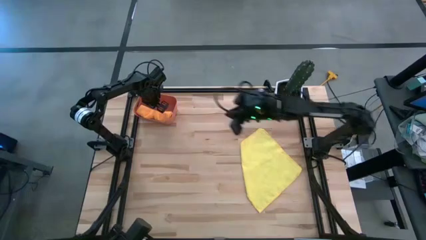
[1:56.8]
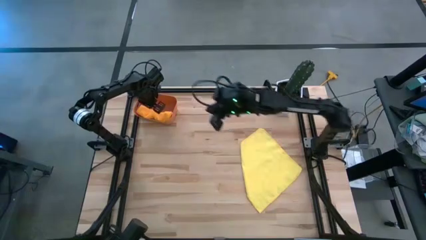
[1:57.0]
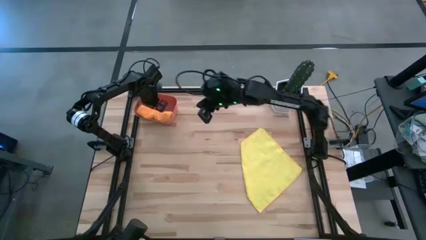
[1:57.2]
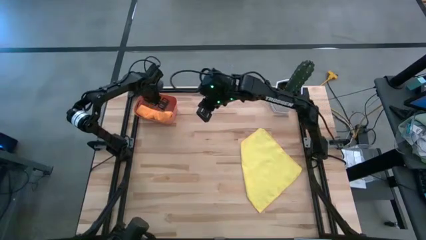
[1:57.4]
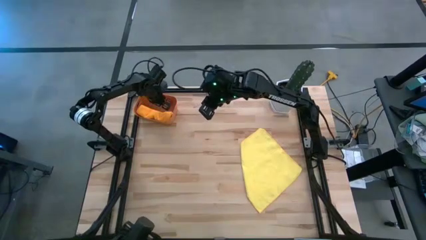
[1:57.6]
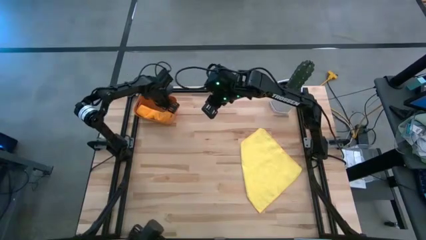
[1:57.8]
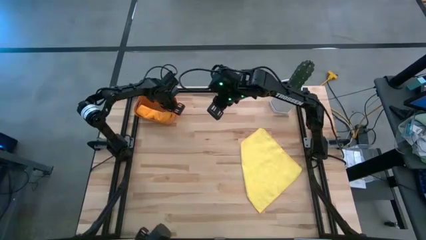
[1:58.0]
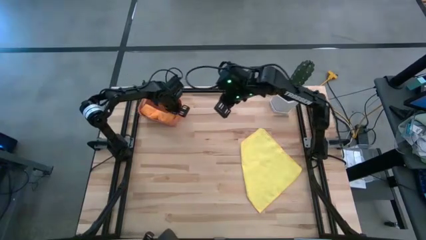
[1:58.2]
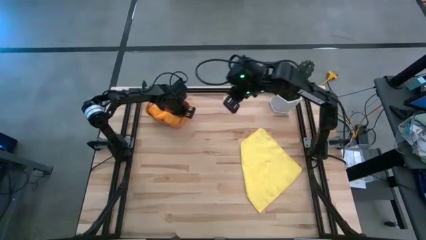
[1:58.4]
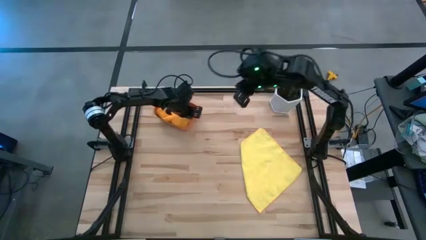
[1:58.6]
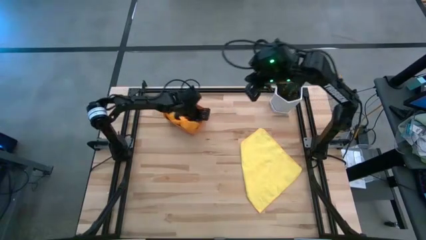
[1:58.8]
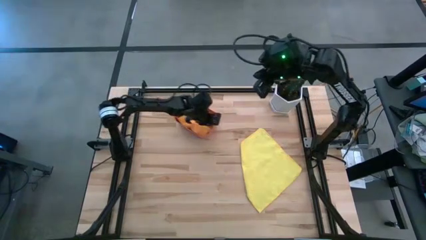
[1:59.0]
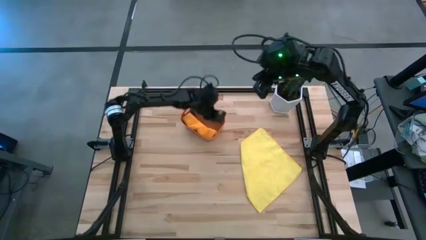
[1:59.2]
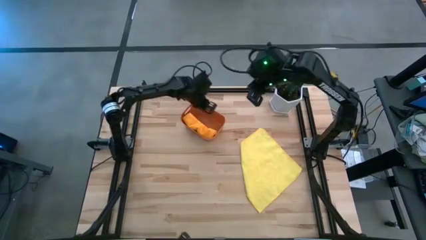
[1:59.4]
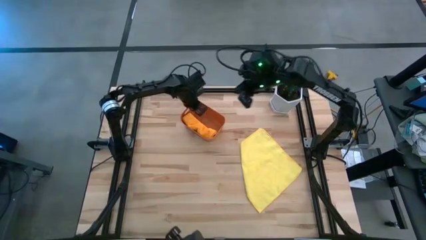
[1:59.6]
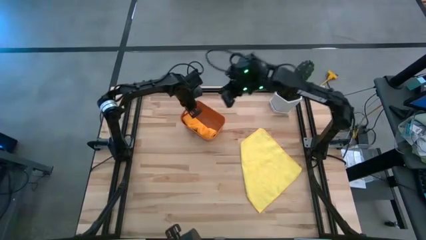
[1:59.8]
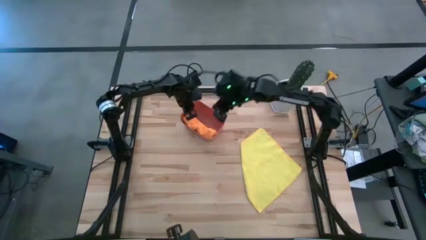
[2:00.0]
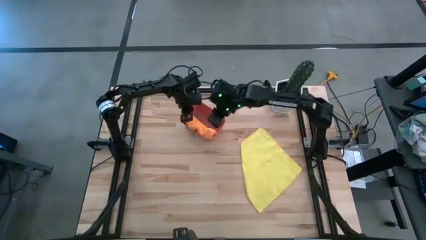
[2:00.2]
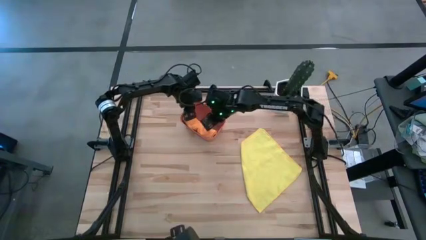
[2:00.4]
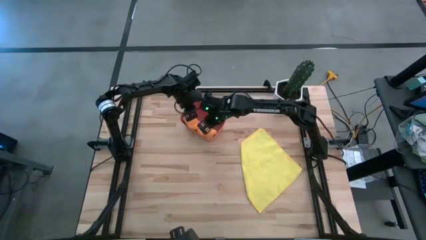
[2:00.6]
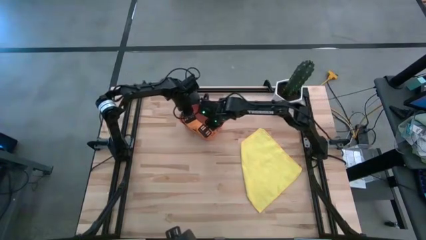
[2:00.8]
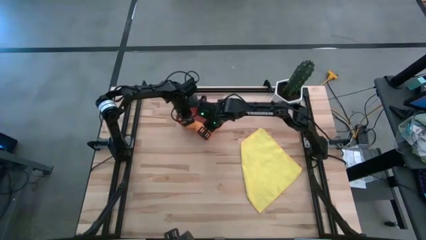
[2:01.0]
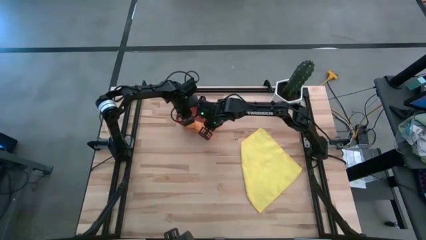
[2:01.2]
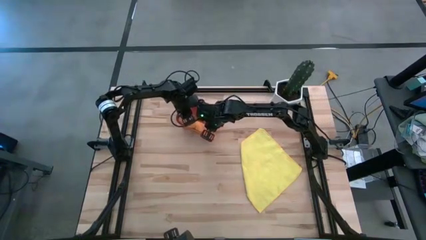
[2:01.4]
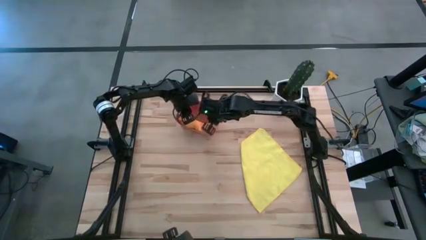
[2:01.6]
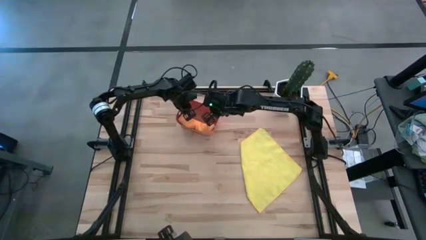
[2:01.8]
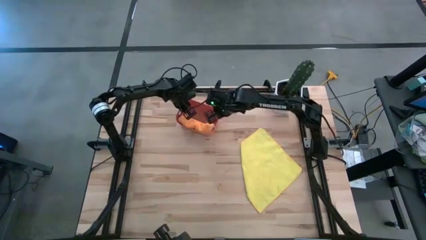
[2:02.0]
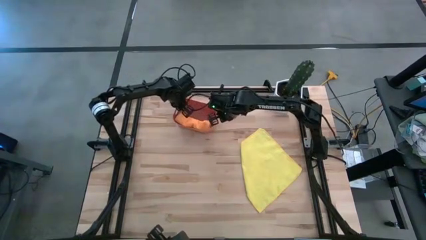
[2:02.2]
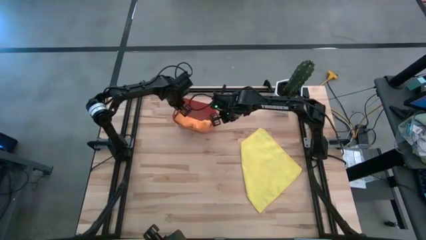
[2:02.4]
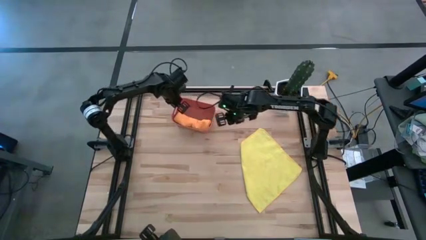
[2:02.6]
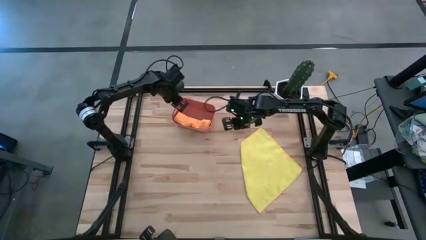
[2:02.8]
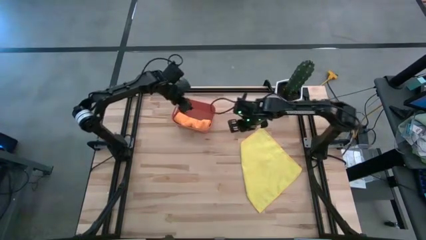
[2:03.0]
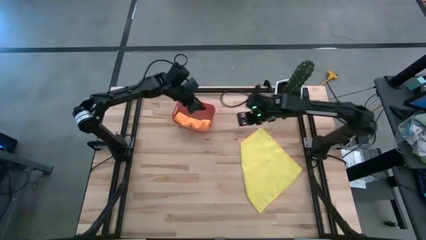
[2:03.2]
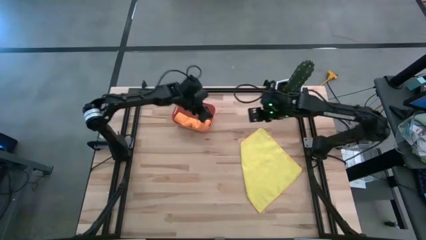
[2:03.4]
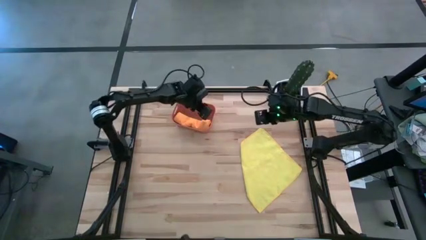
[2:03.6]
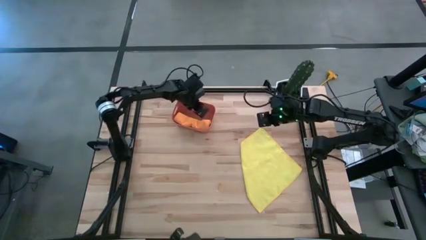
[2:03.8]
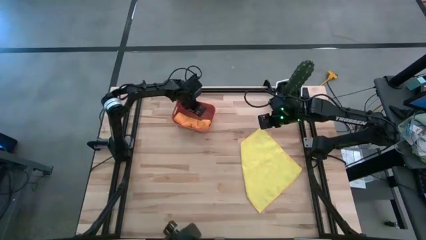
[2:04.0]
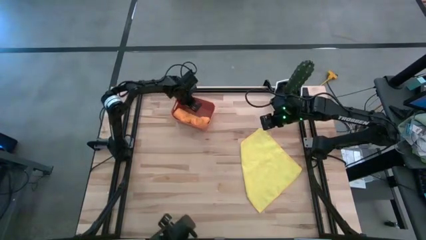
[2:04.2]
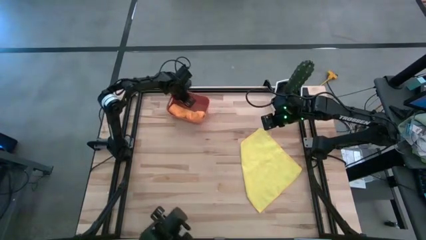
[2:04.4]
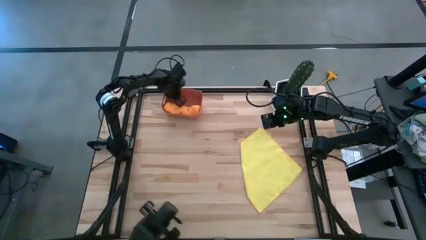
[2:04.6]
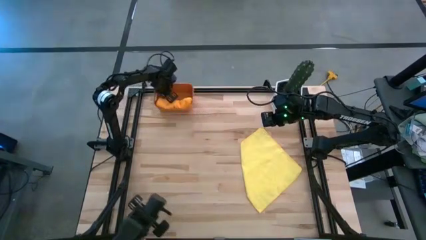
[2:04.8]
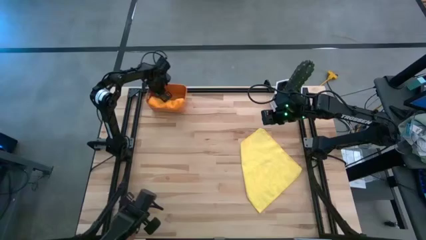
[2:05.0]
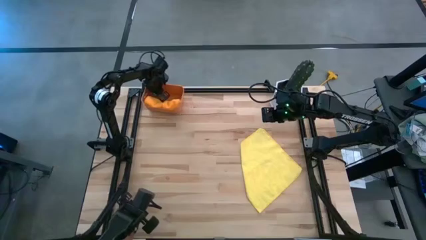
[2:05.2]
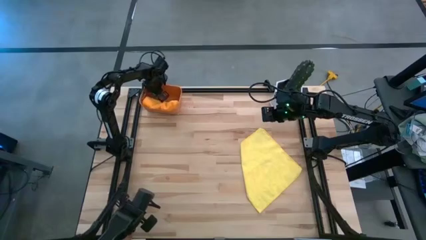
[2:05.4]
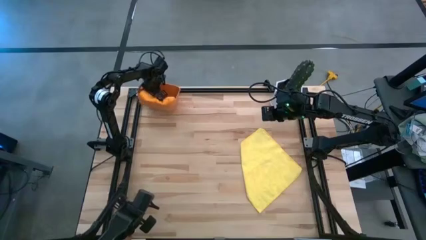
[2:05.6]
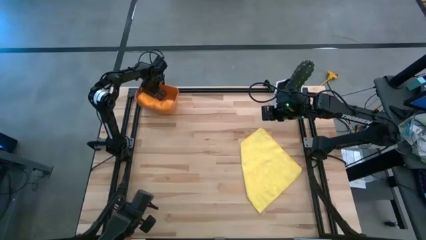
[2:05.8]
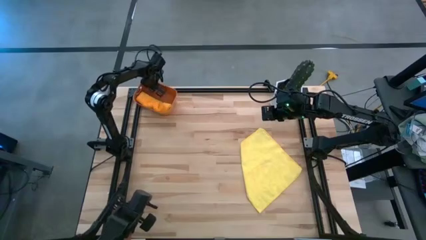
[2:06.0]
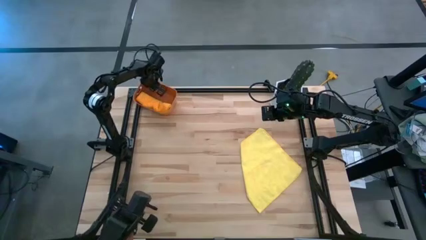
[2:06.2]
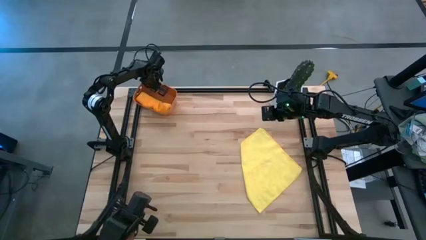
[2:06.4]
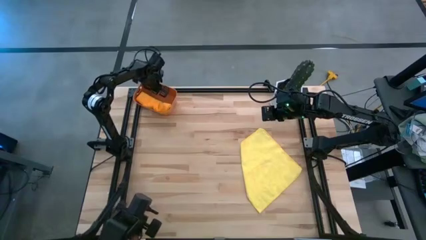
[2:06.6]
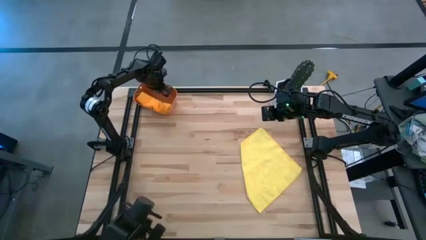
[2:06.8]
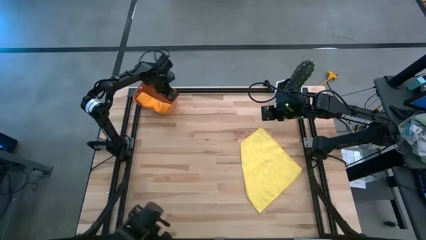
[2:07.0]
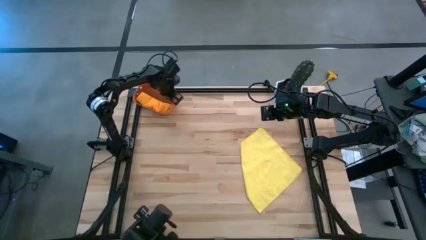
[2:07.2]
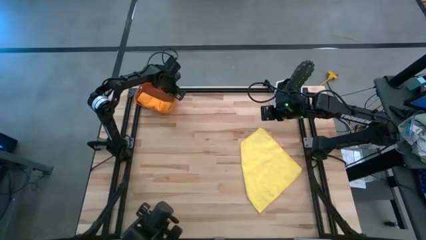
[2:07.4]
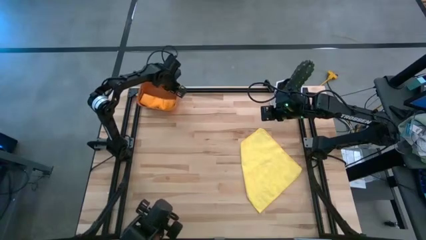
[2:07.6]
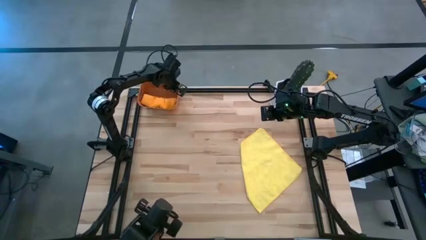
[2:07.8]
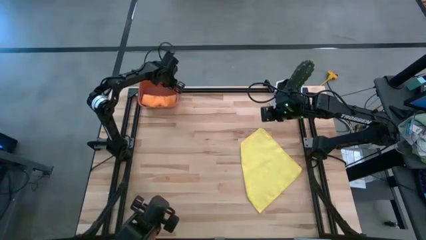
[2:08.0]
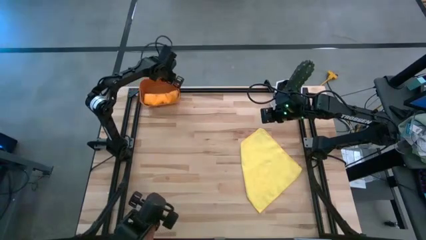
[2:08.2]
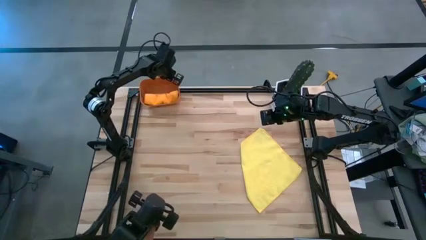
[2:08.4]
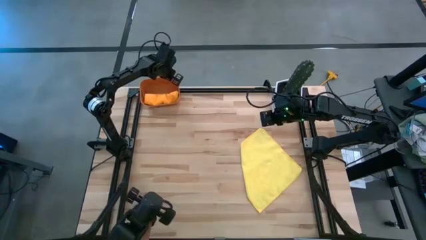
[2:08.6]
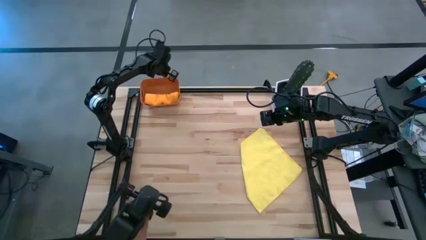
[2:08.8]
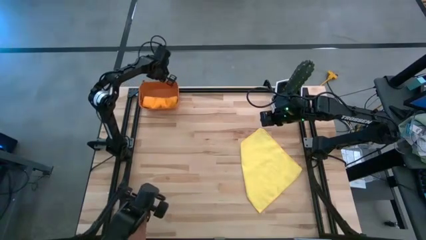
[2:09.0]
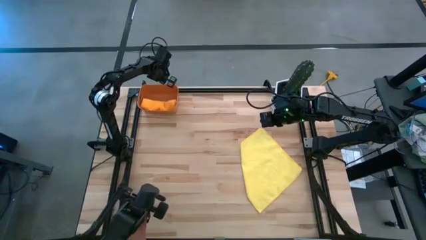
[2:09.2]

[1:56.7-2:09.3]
Task: Roll microfiber towels into tight, uniform cylinder then place into a basket
Adjust the orange bin
